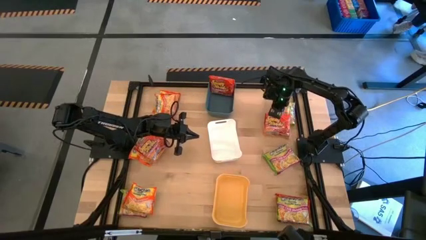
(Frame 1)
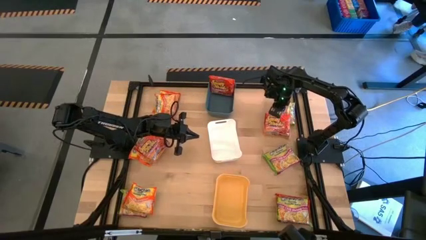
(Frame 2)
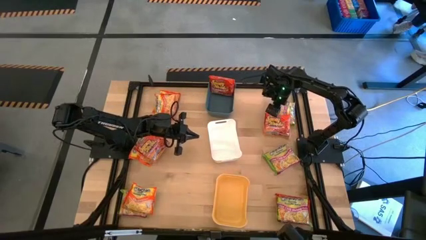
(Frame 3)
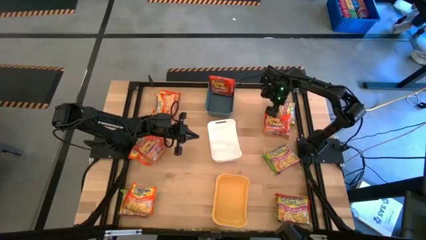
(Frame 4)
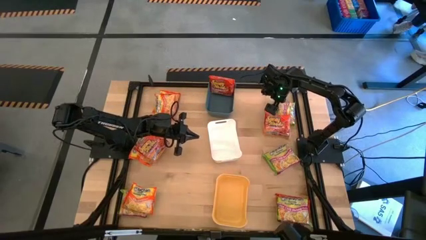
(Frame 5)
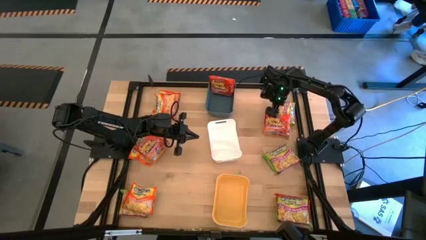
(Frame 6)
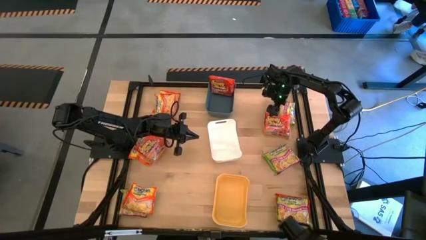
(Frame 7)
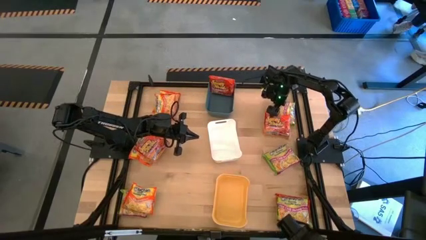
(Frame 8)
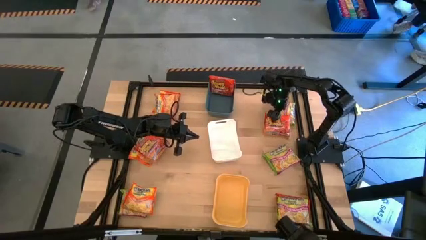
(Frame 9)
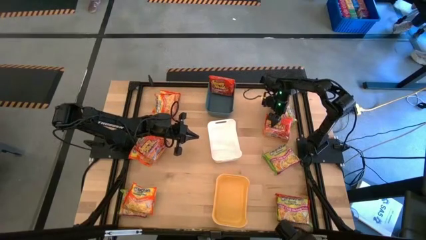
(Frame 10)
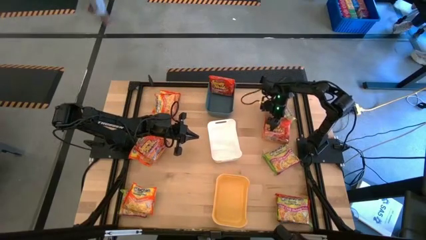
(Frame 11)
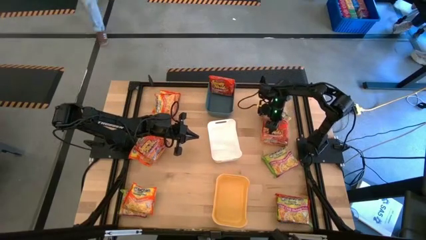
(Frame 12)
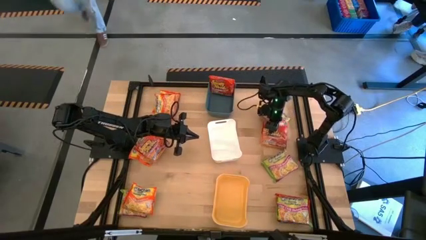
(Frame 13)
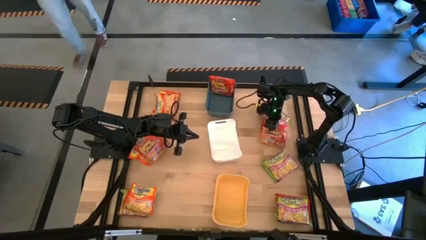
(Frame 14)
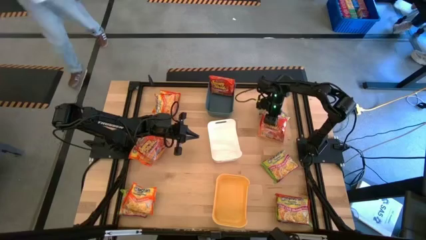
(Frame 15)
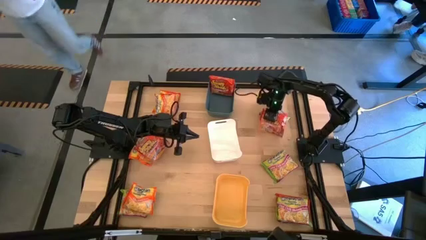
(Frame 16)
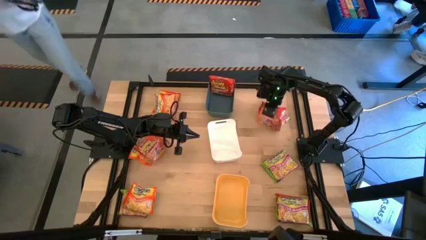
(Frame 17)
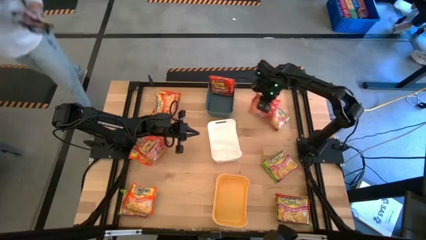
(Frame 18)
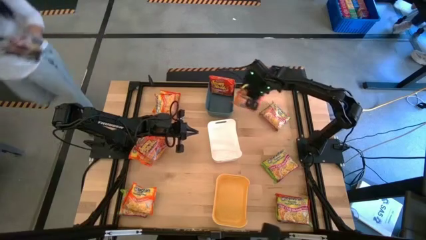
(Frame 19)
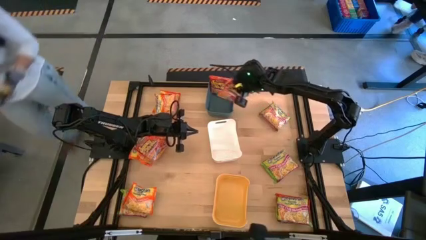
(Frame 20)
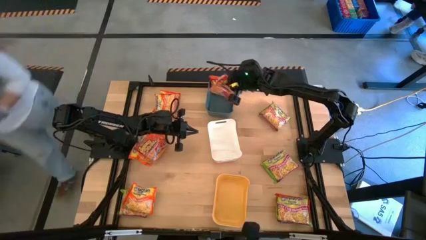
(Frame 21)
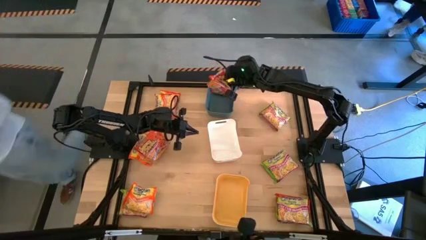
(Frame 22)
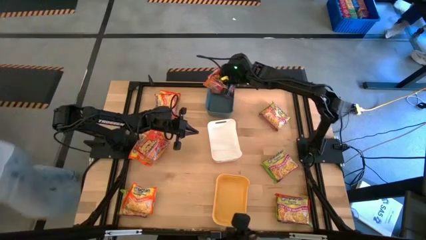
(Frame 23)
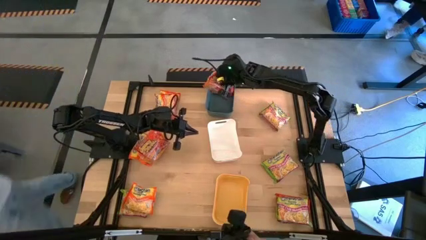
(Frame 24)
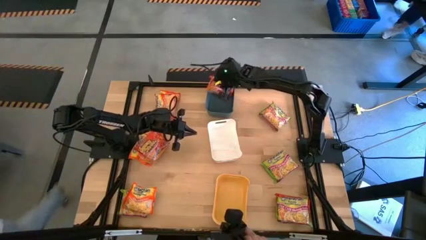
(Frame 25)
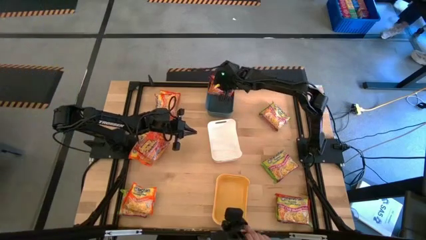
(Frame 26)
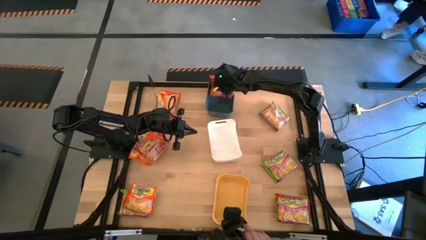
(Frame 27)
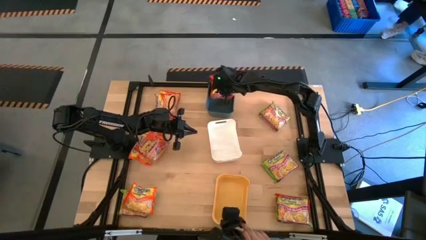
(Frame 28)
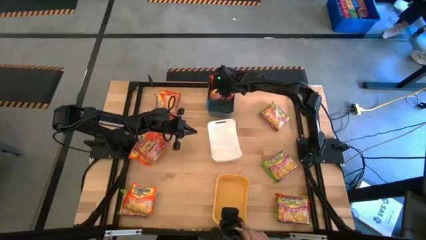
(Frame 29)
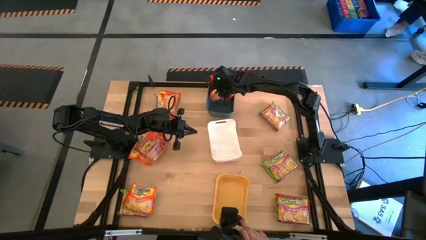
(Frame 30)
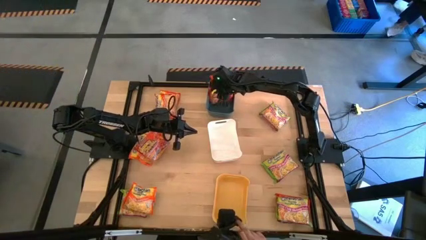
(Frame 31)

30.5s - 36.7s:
Task: Sort Maruchan noodles
Put the red noodle pack into the blue bin

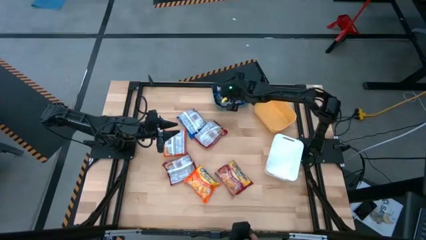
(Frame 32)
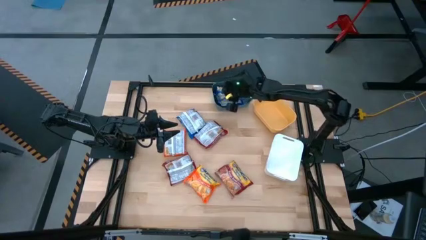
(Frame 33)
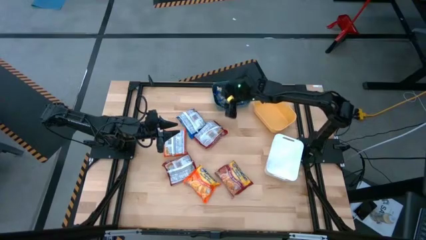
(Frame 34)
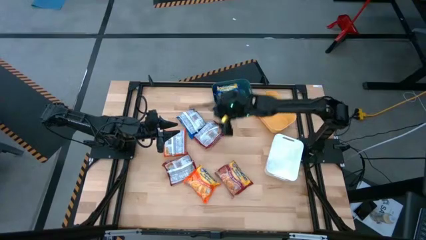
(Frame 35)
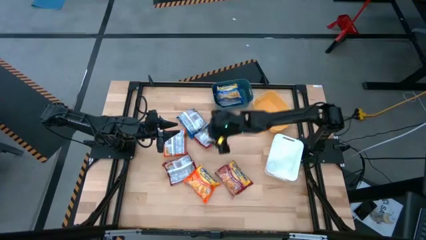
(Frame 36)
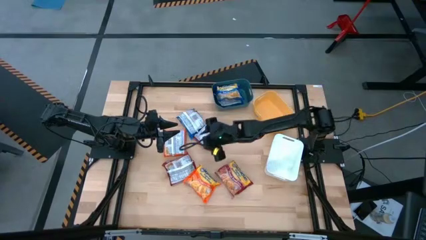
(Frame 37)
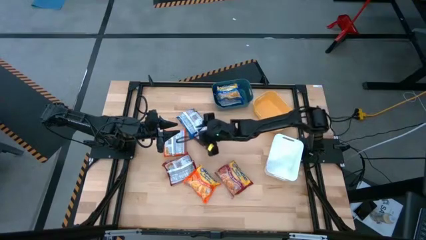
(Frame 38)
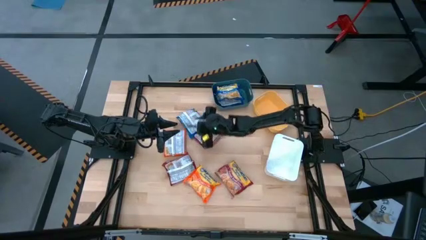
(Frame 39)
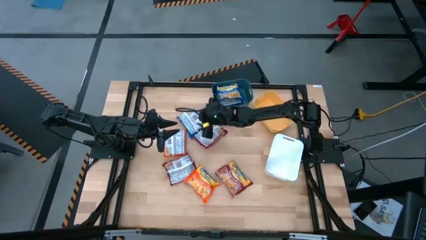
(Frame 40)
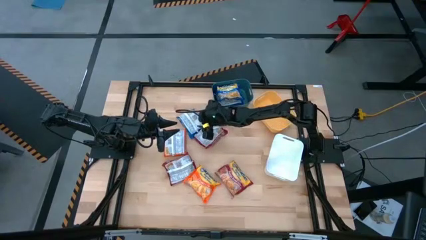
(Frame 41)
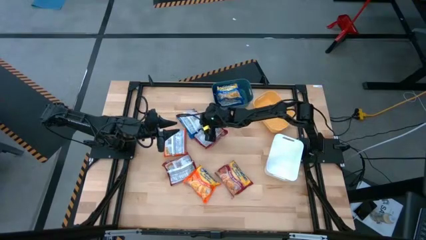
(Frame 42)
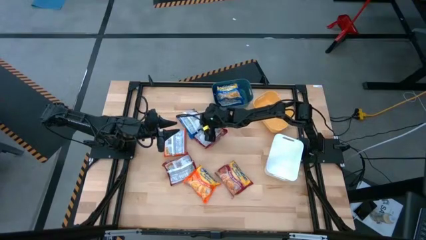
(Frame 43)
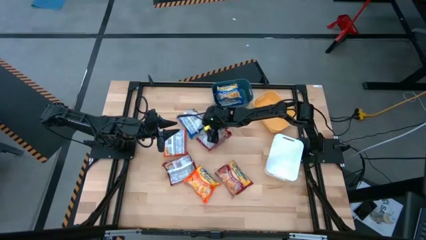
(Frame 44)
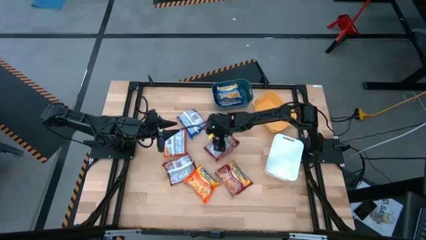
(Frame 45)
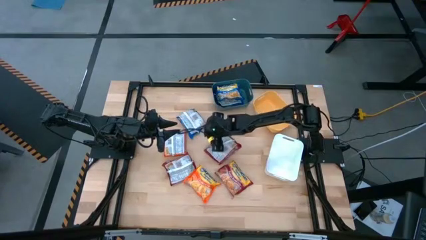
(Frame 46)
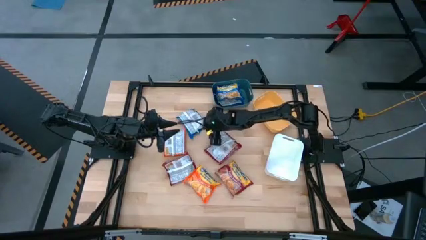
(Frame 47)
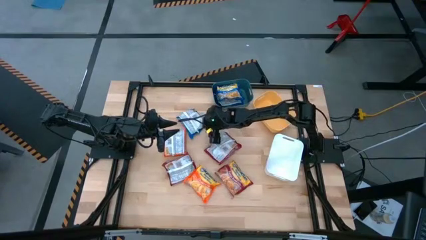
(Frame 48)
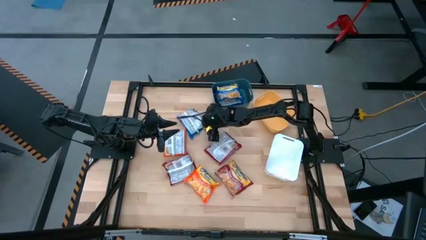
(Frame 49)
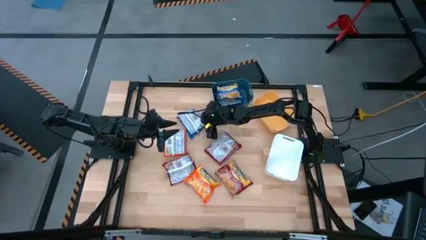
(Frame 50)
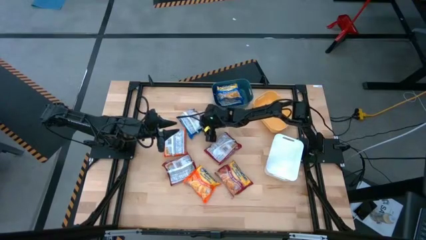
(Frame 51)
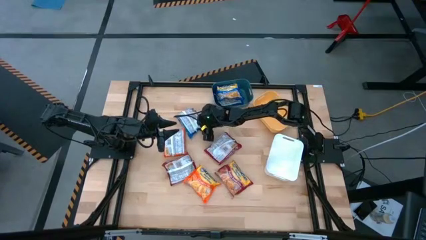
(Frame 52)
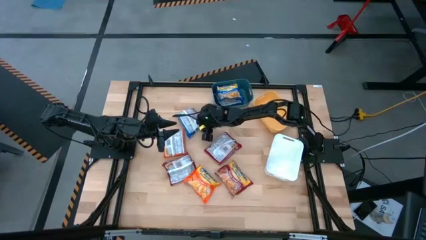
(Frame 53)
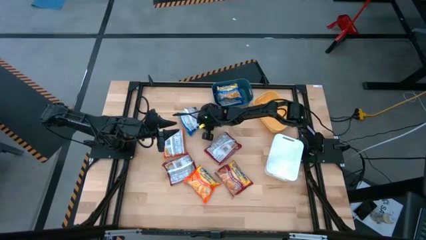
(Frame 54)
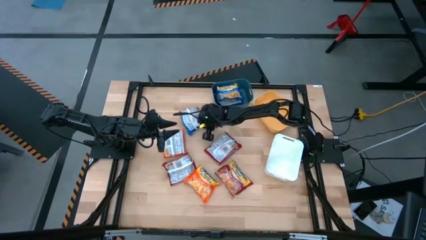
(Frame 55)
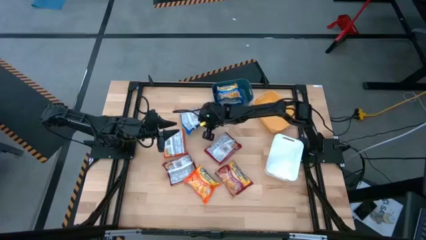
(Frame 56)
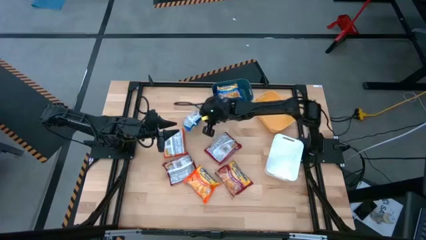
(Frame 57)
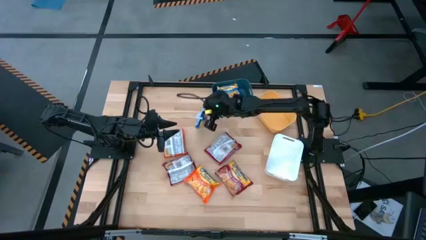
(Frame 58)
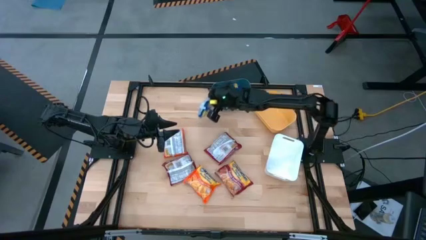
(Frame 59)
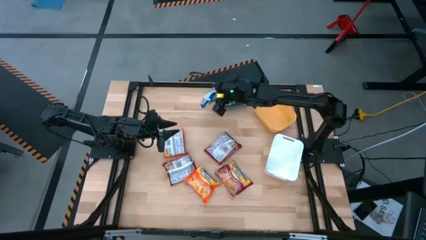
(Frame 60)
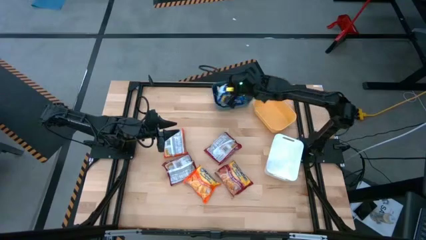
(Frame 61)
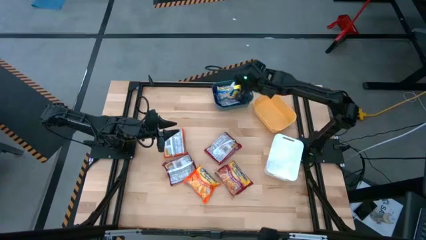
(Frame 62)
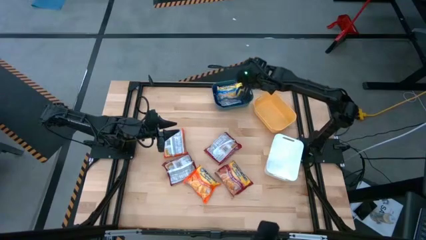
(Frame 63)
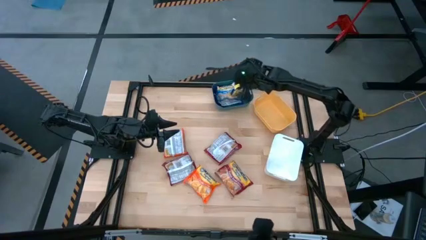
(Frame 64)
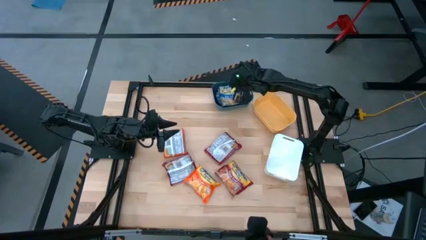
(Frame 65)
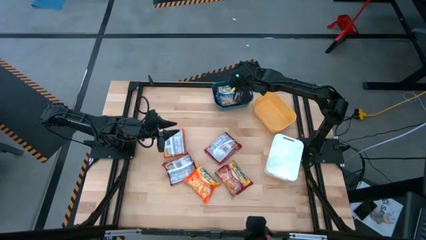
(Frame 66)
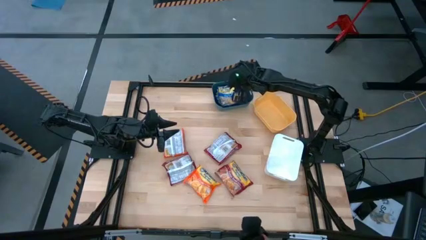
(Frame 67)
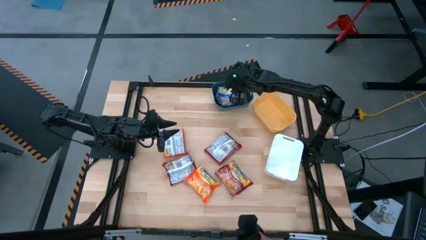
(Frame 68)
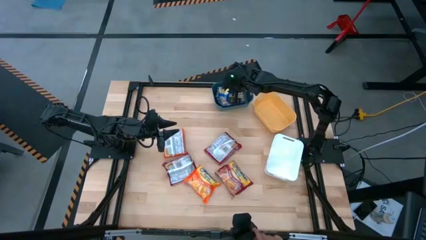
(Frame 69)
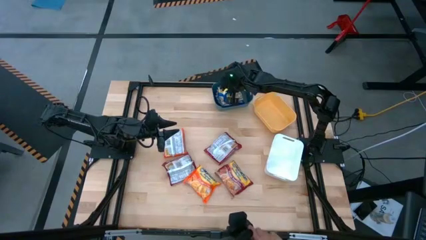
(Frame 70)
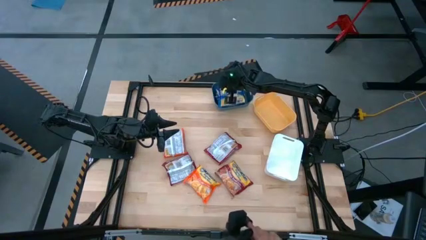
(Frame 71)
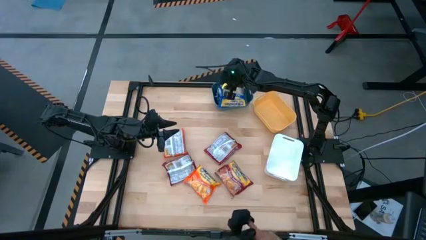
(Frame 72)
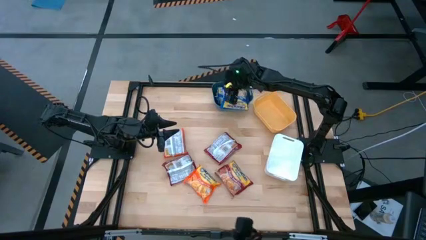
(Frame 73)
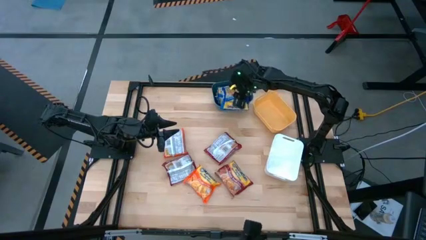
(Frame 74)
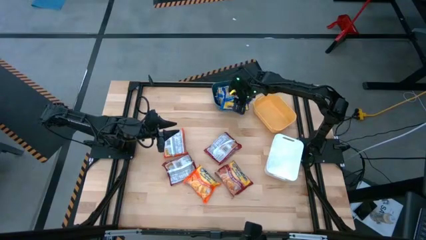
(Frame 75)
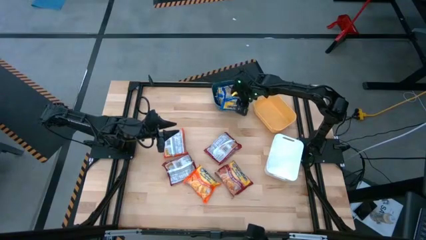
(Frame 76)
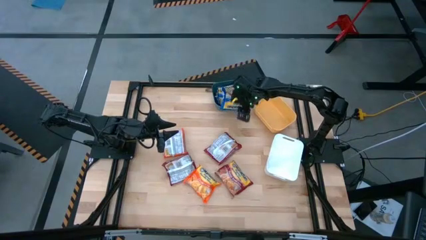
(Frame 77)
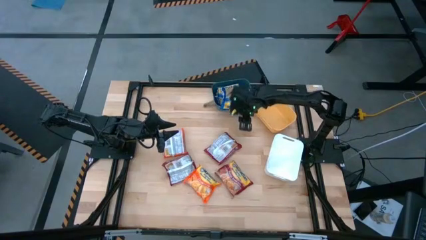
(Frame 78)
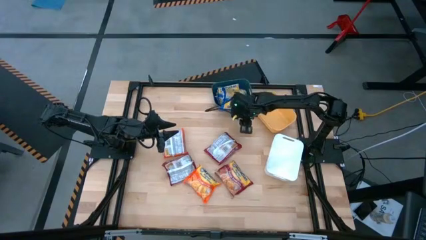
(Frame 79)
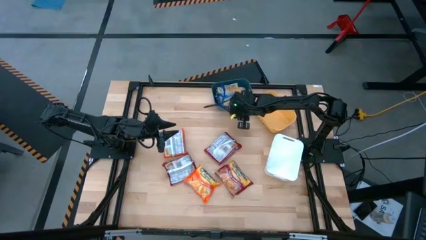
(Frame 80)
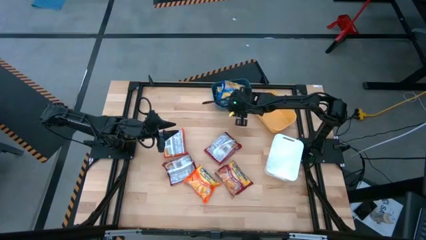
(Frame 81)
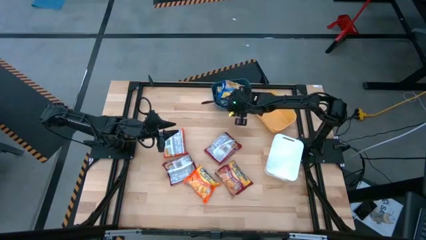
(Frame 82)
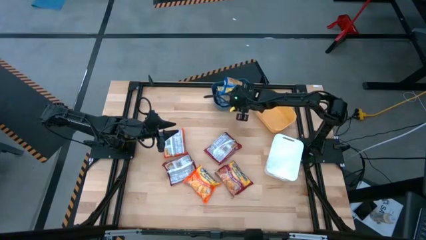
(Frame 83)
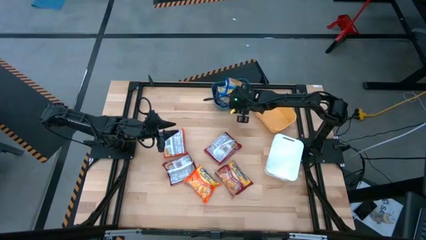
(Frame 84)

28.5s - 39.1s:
Task: Sort Maruchan noodles
Put the blue noodle pack into the blue bin
